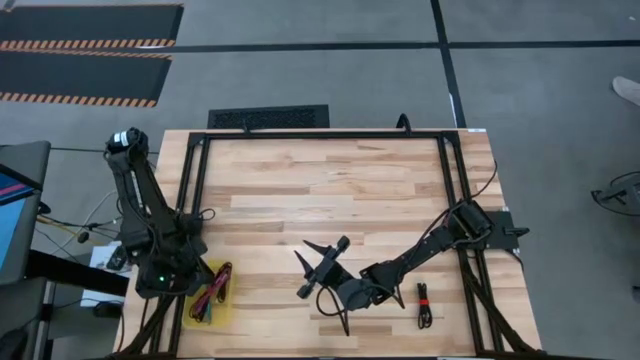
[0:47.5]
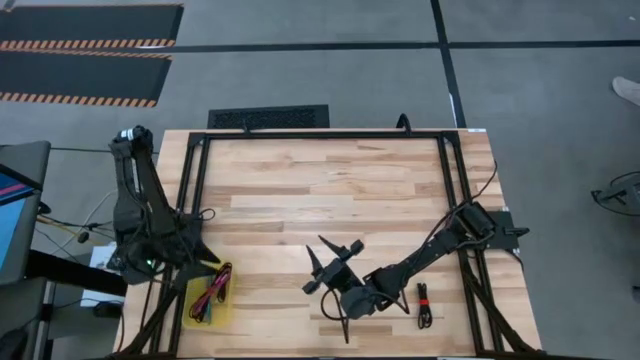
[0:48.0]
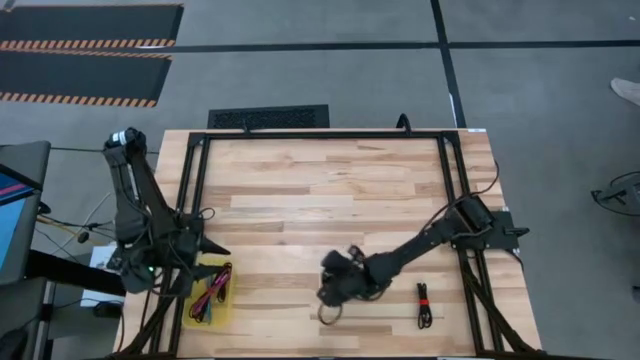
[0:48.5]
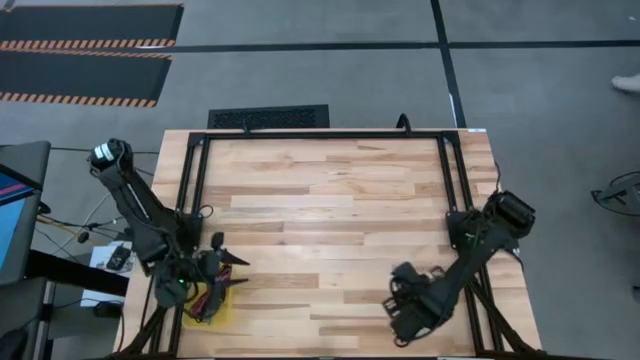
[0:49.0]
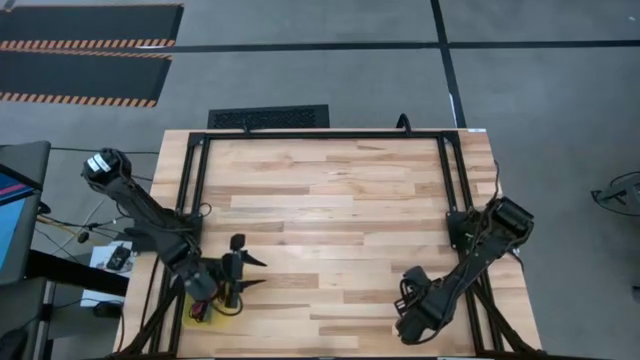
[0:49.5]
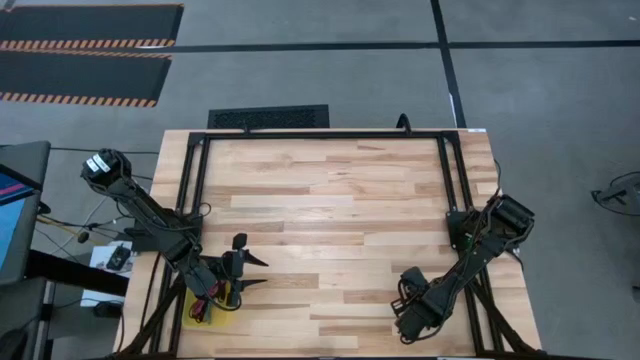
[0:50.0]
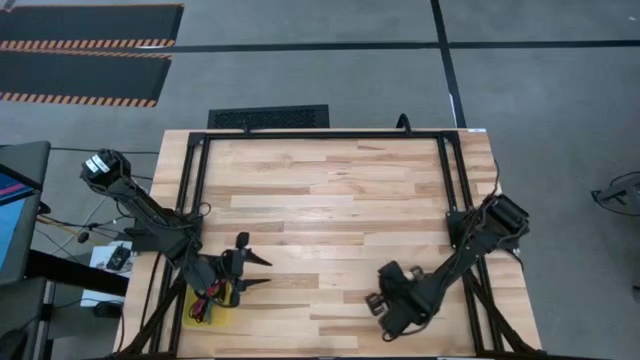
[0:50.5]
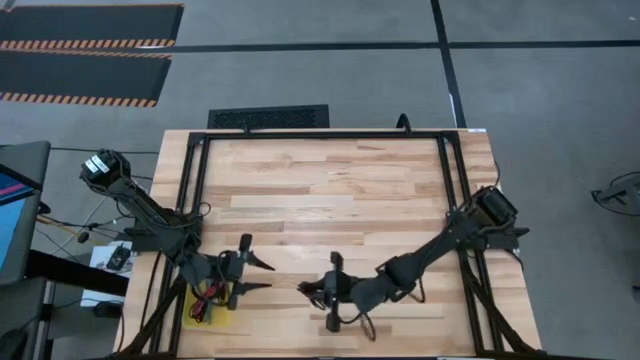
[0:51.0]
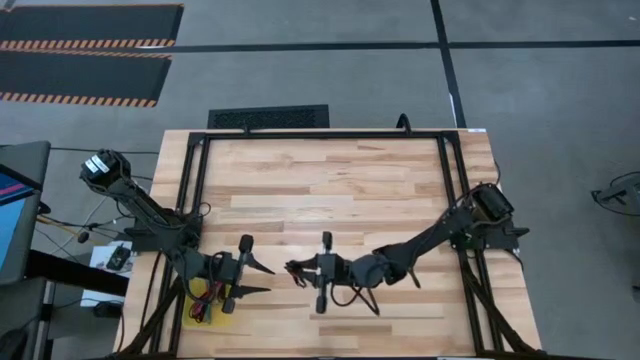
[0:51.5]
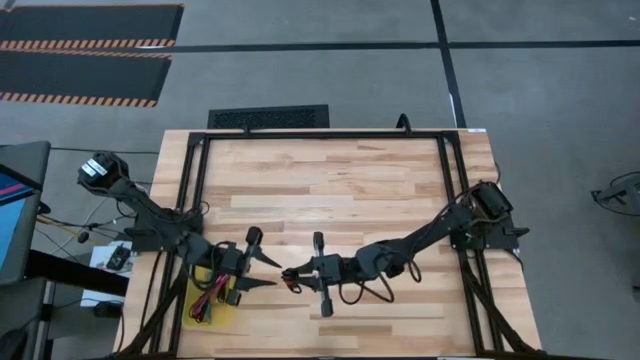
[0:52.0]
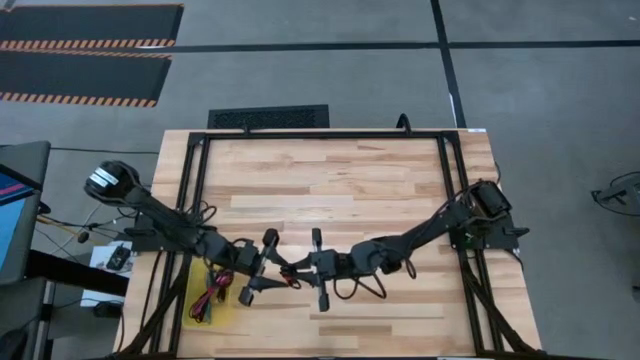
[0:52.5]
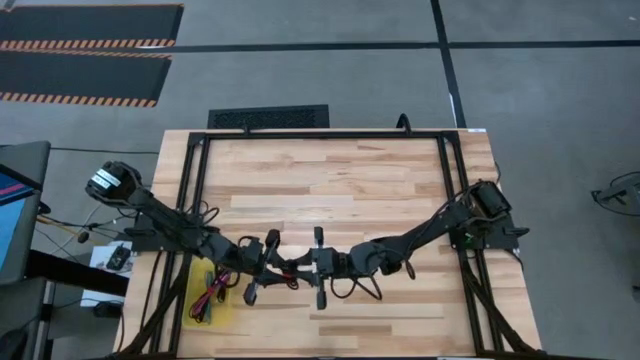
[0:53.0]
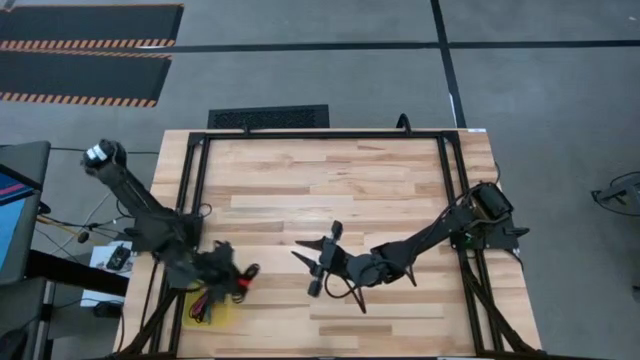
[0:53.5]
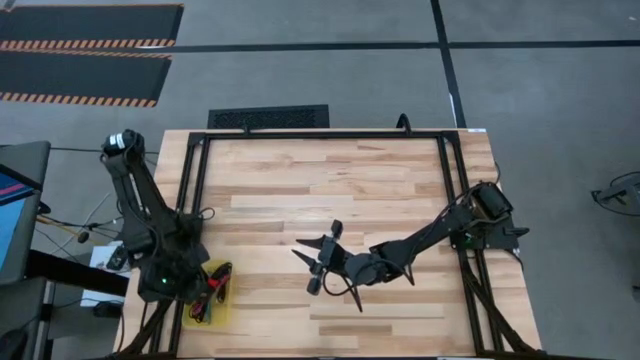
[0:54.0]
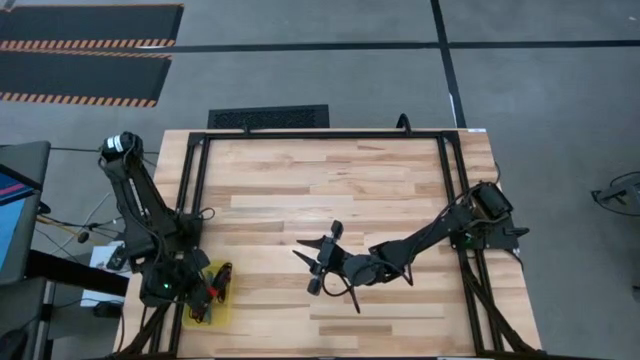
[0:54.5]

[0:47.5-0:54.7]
Task: Pick and place USB-C Cables
Put the black charger cable into the yellow bin

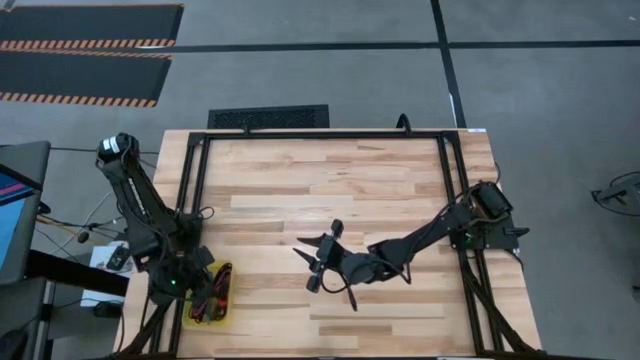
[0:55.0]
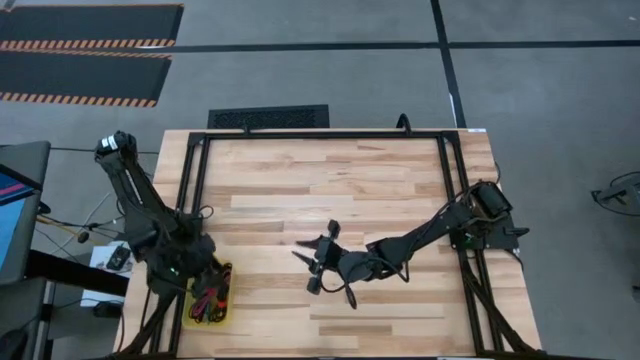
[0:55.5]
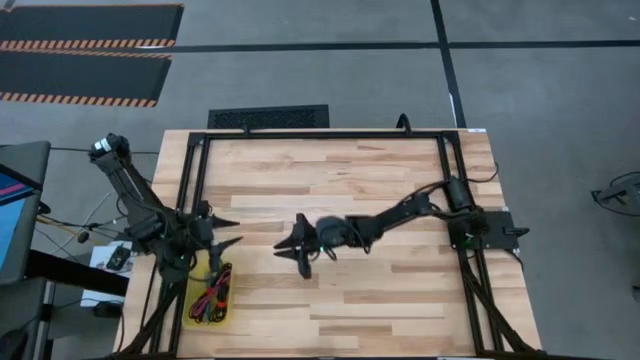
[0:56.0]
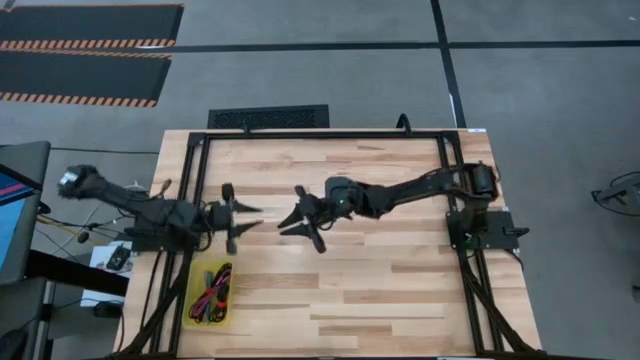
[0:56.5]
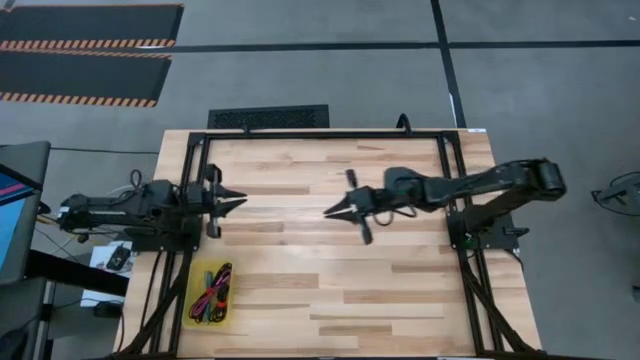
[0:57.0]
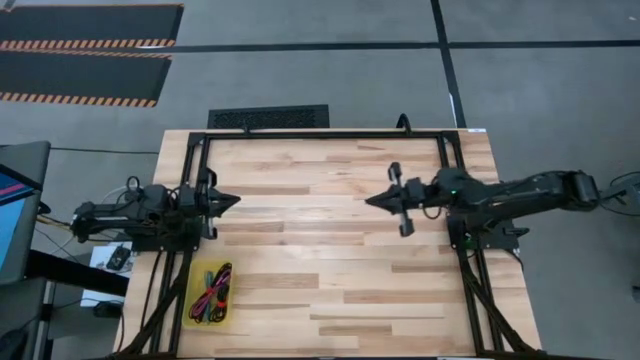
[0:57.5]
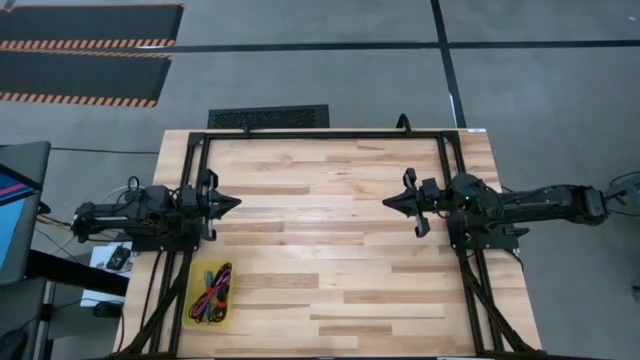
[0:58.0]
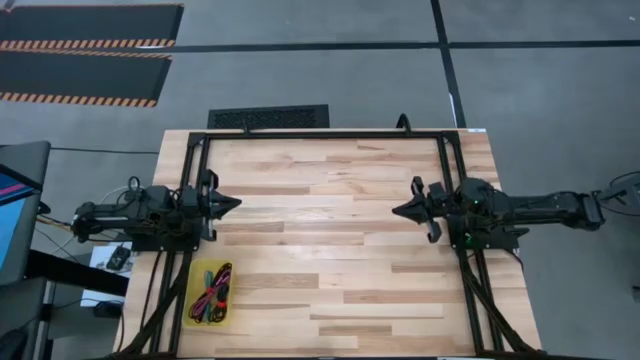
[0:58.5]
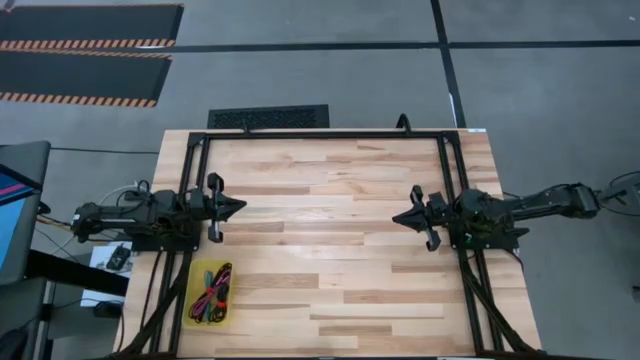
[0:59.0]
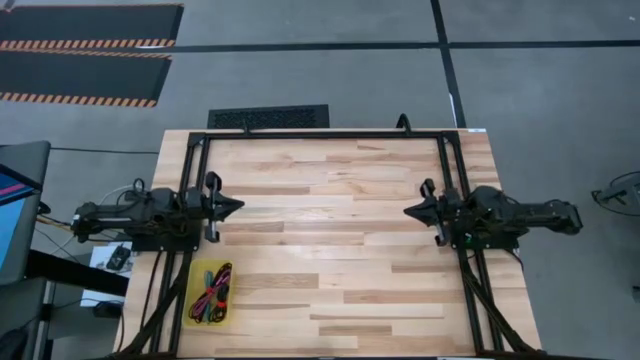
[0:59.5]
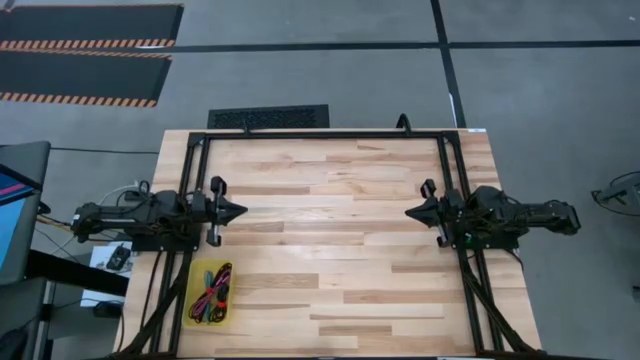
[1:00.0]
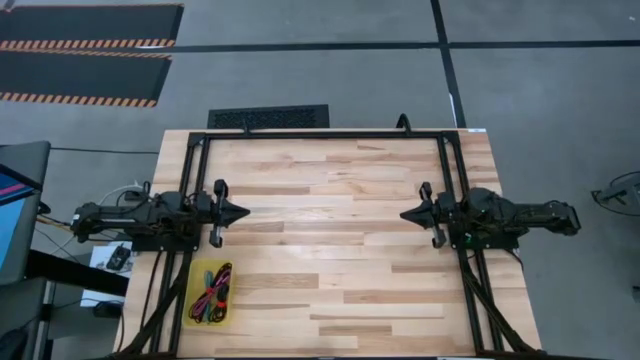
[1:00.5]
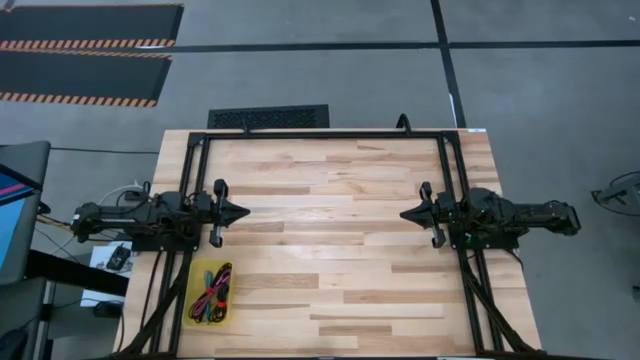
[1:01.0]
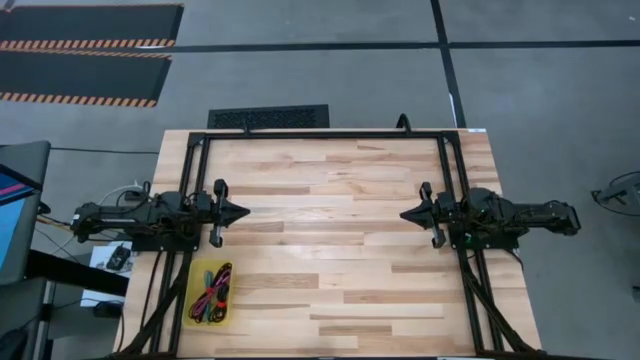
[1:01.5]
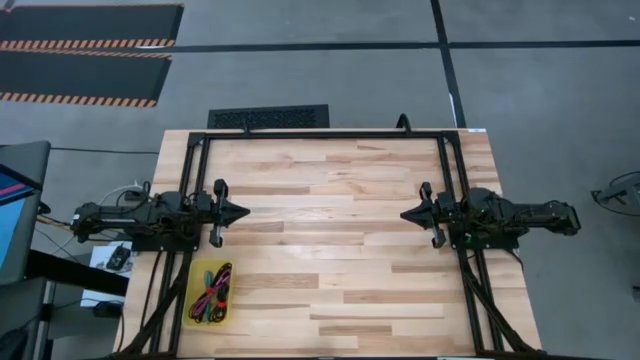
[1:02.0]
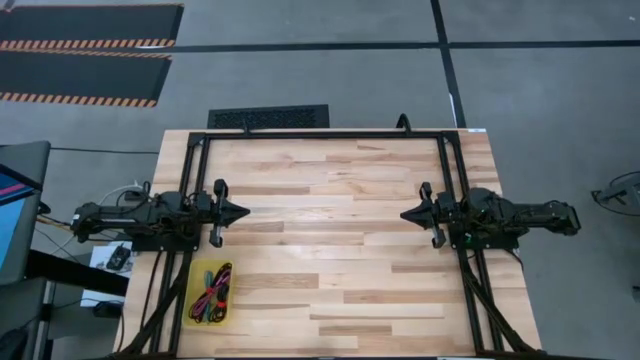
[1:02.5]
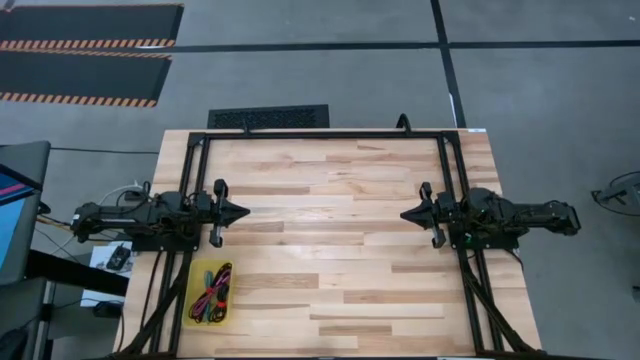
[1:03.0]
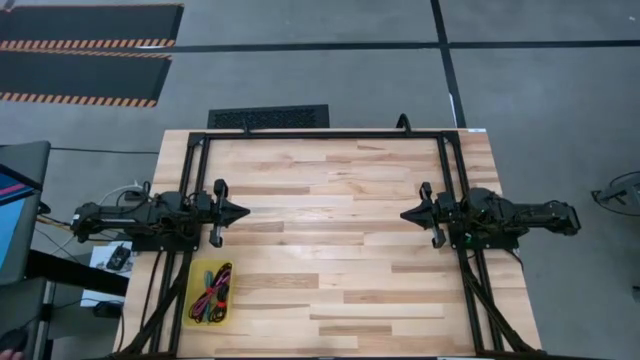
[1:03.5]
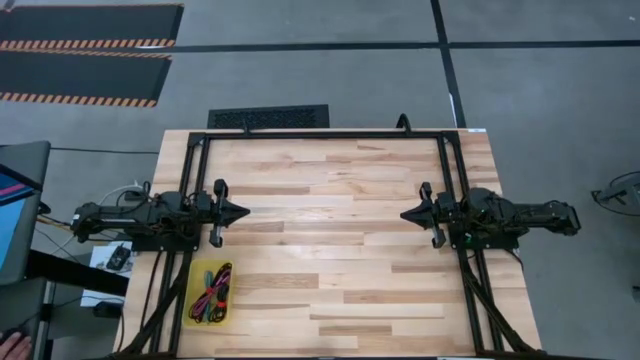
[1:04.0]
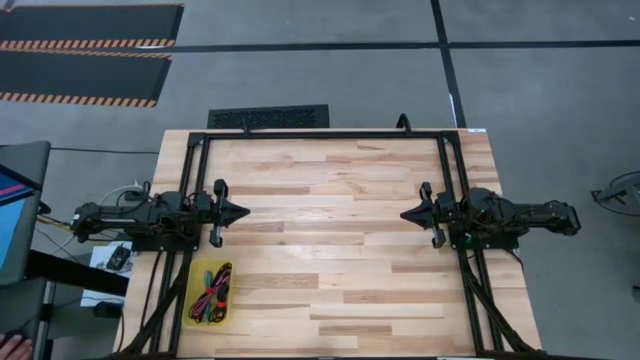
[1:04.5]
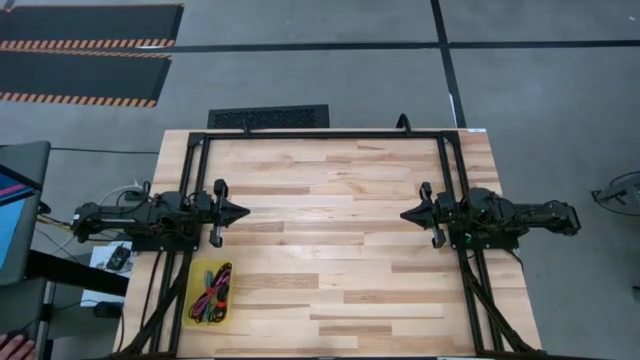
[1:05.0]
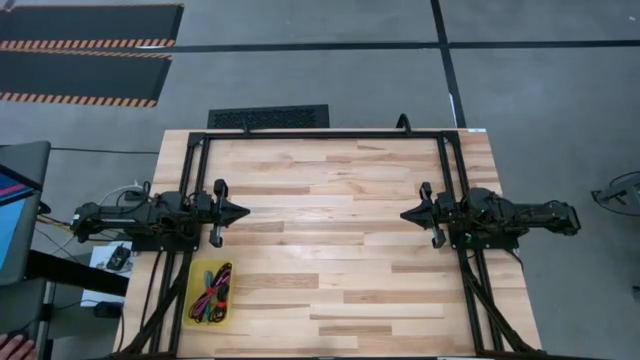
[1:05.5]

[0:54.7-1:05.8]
Return to Home Position

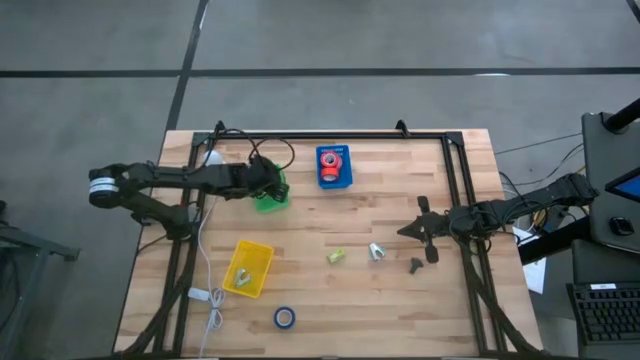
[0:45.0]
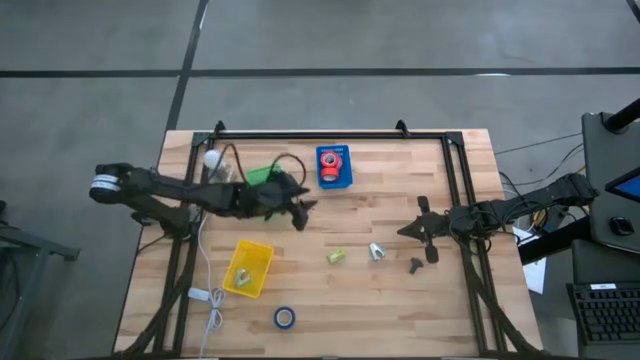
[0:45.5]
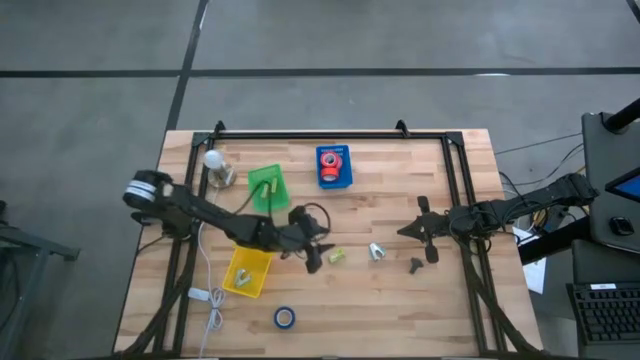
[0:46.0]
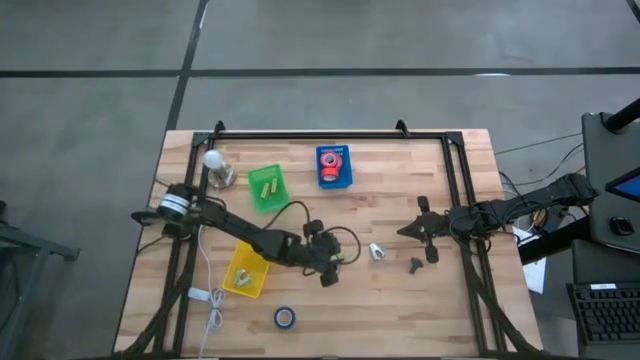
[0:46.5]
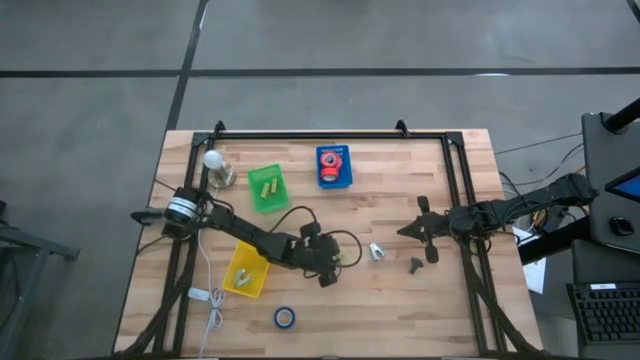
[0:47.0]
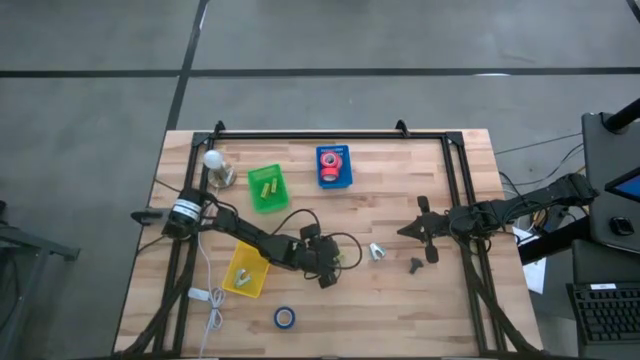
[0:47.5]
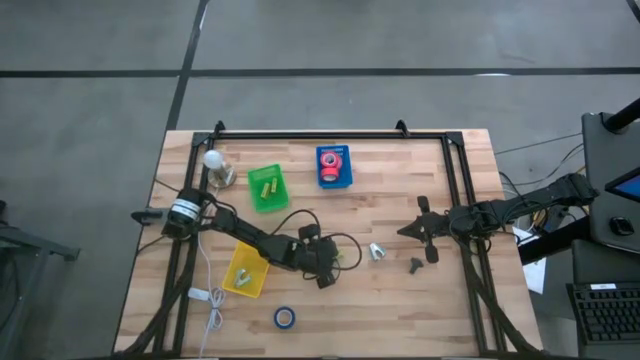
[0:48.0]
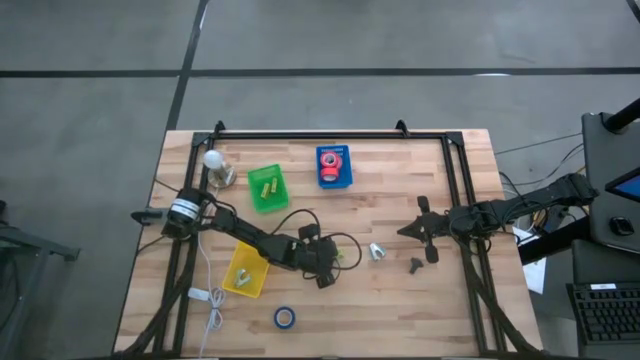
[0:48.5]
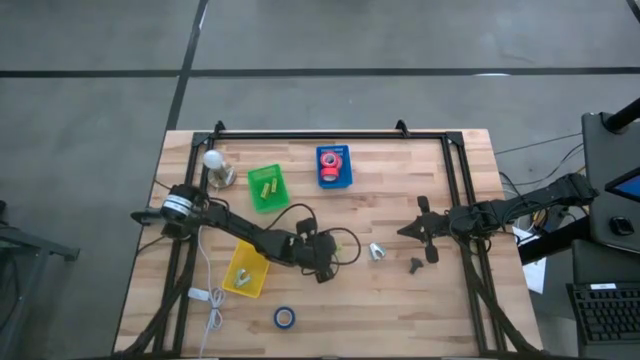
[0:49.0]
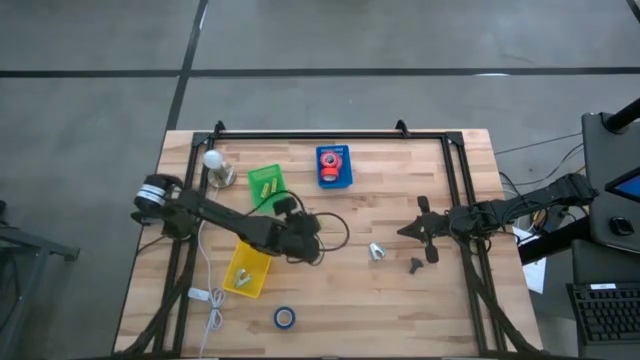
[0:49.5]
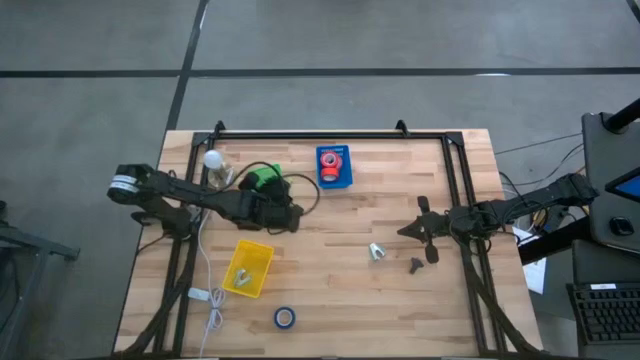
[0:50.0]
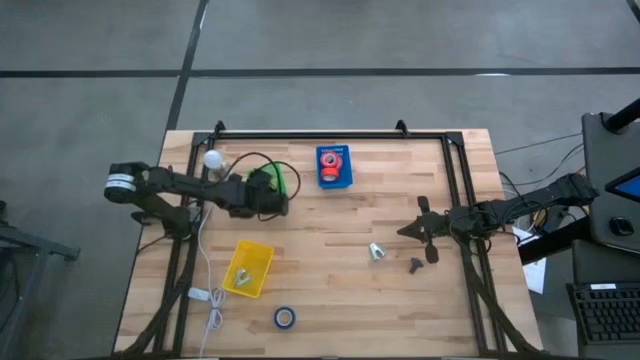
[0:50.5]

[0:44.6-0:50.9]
Task: Pick and place Stapler, Stapler remover, tape
Put the green staple wire box into the green bin
